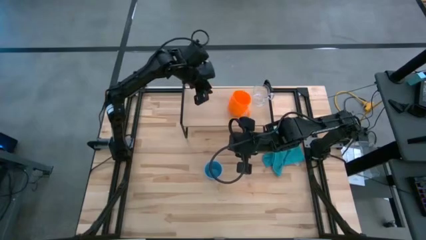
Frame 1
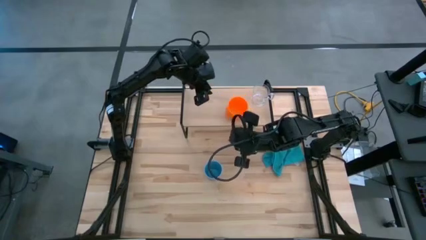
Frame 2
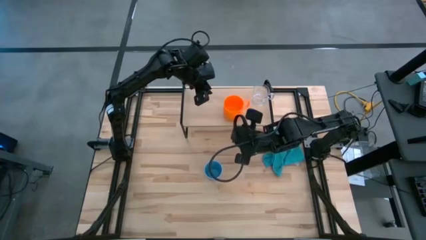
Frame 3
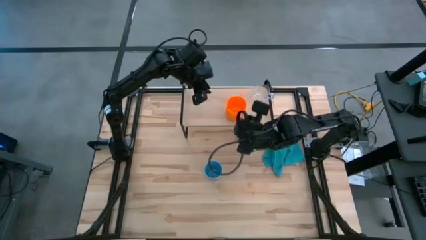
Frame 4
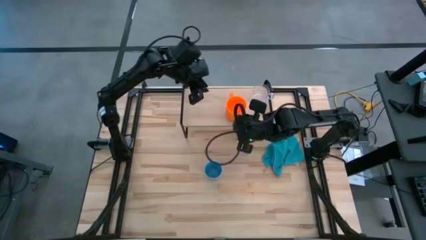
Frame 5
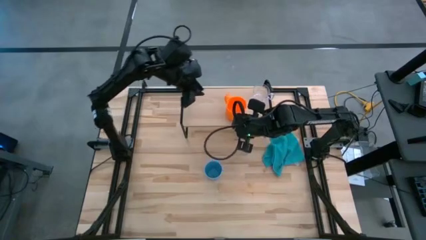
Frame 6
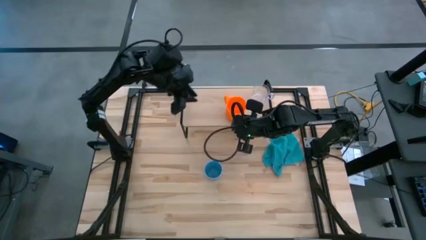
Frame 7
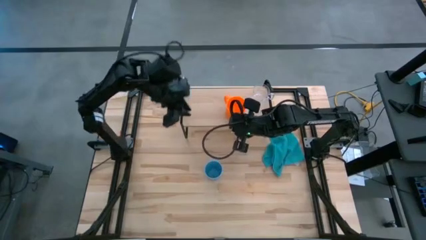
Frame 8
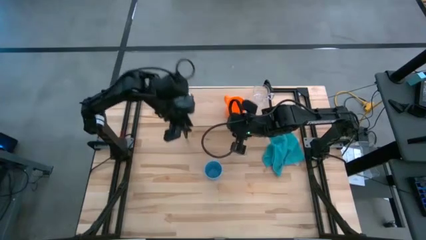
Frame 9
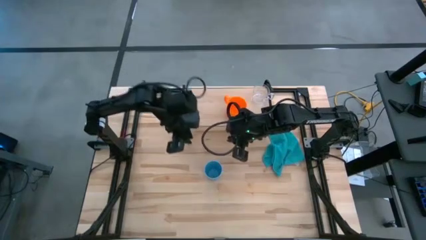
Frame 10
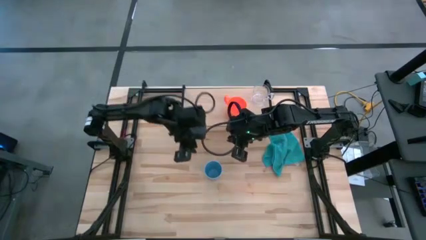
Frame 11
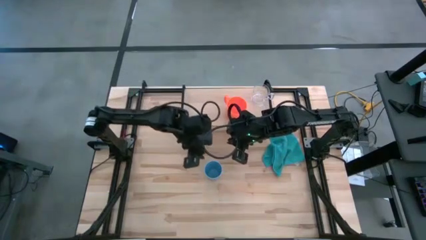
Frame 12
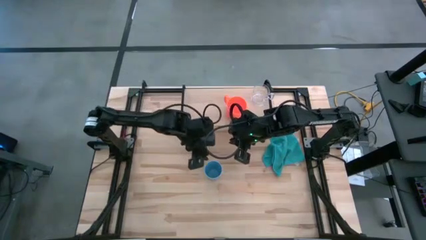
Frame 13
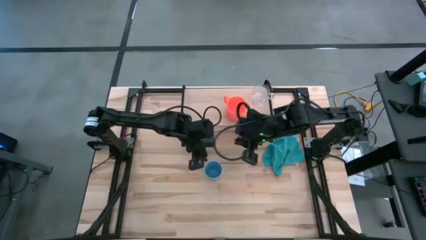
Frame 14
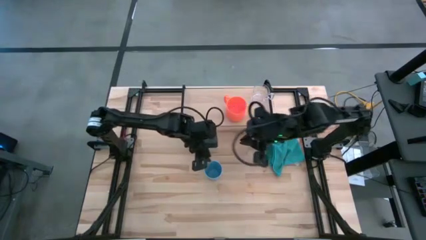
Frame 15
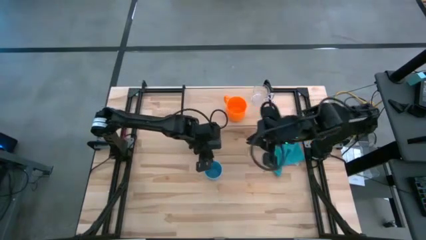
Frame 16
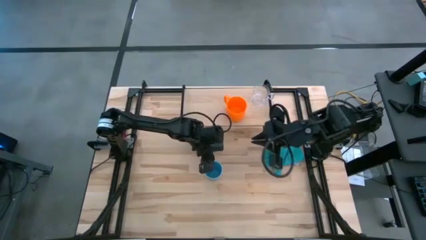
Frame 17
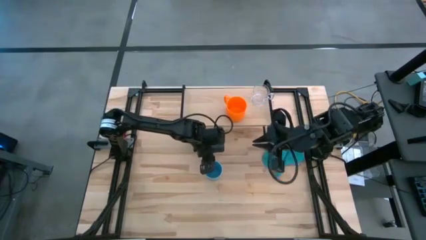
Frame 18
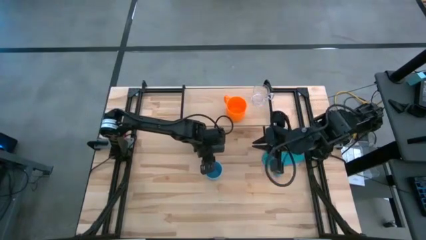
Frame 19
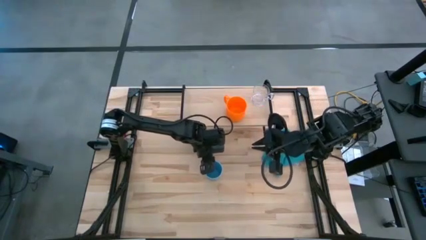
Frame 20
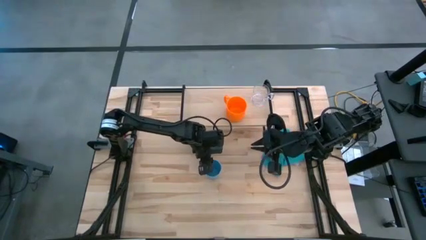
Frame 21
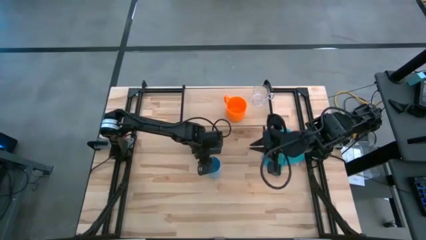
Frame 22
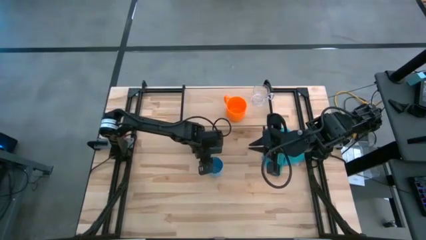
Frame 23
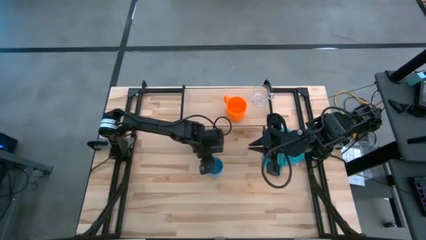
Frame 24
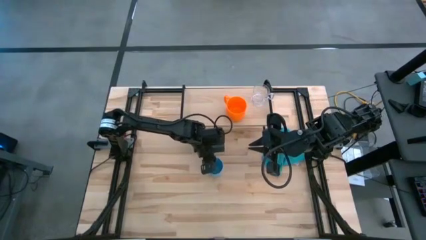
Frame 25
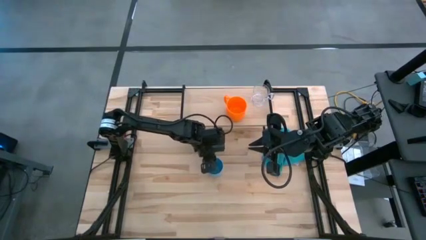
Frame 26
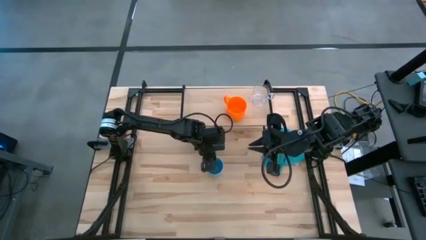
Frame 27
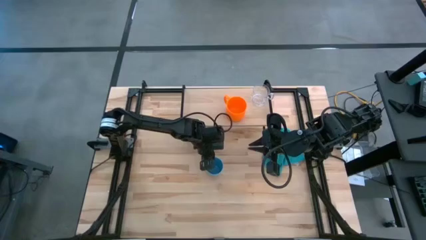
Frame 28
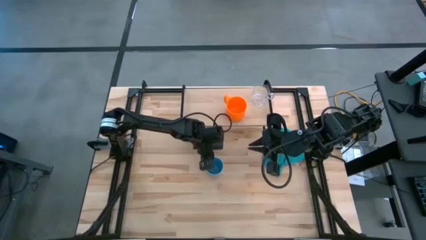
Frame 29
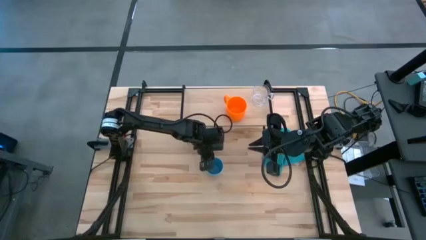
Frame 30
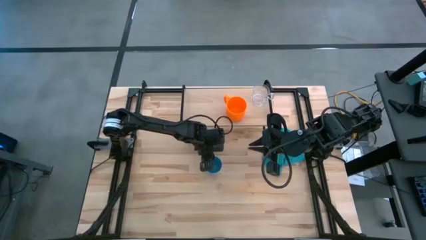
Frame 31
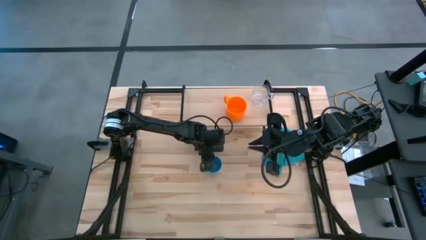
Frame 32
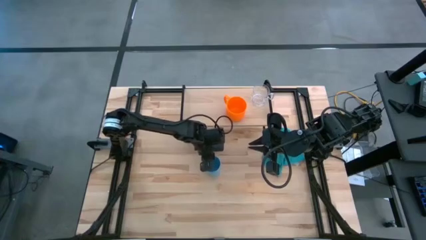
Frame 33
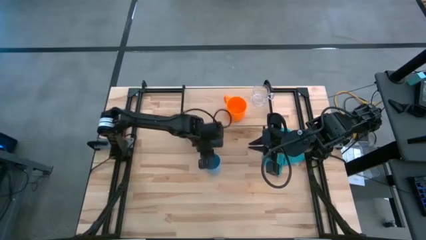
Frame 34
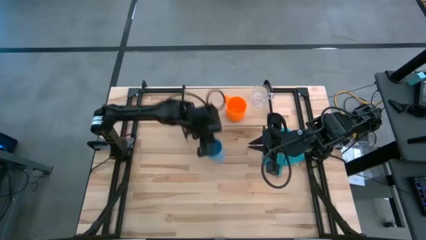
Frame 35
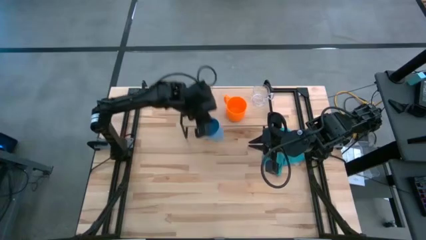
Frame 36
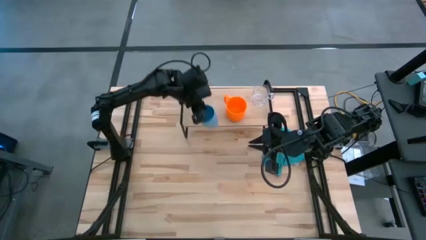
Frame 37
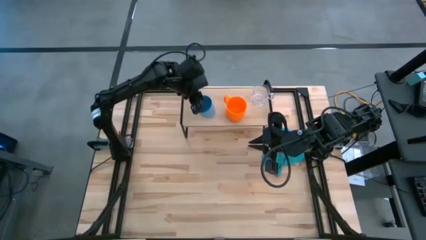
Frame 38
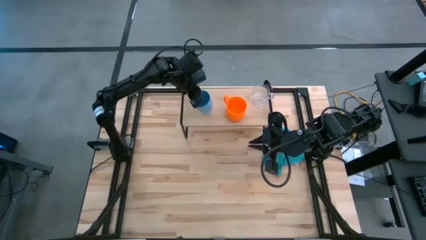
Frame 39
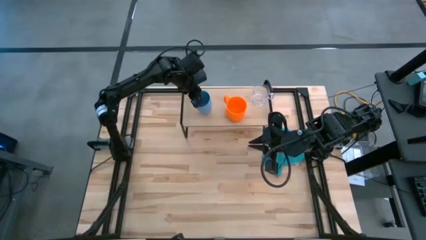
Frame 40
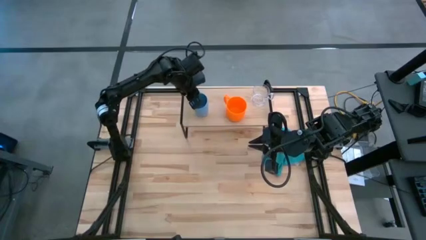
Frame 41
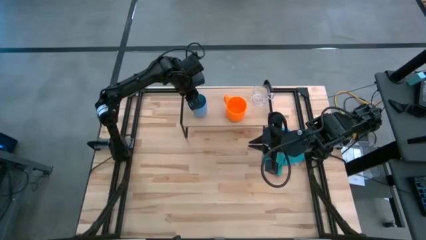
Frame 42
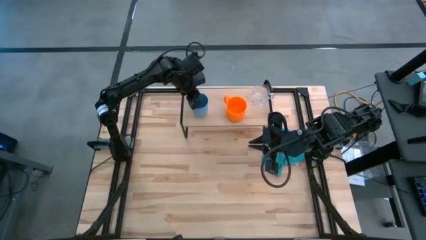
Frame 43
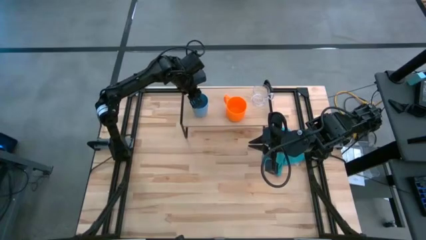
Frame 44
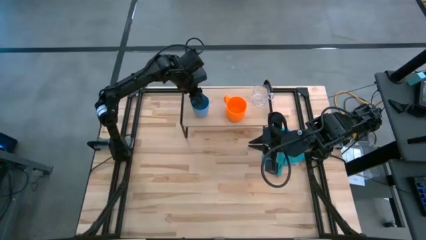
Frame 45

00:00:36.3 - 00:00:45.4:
Task: Stack small to large cups/mugs on shelf
Put the blue mug on the shelf

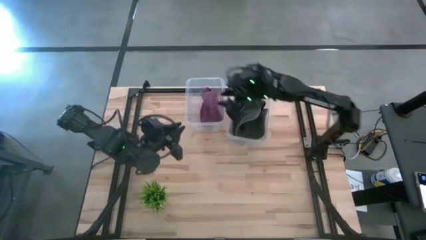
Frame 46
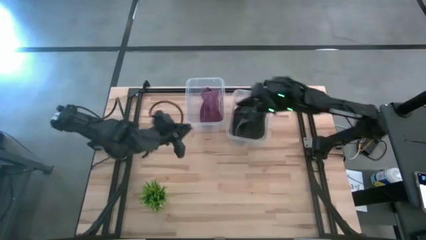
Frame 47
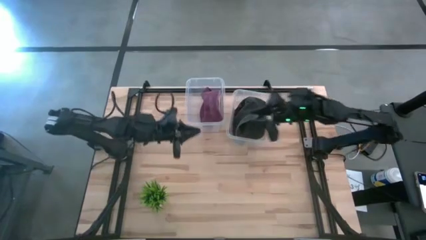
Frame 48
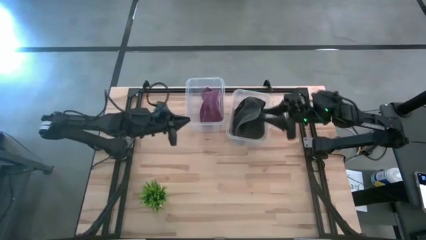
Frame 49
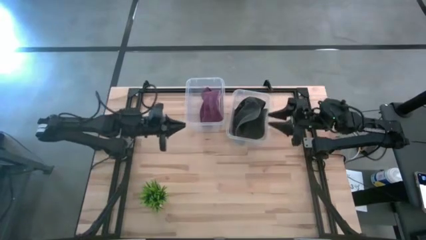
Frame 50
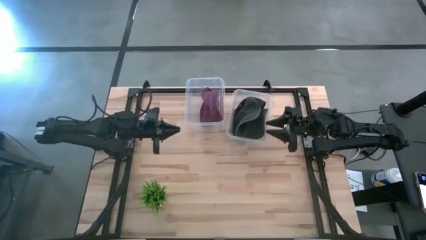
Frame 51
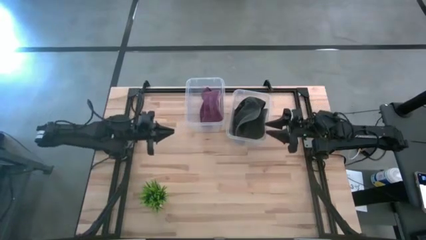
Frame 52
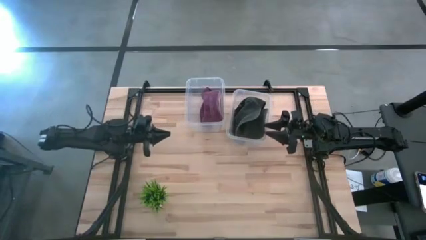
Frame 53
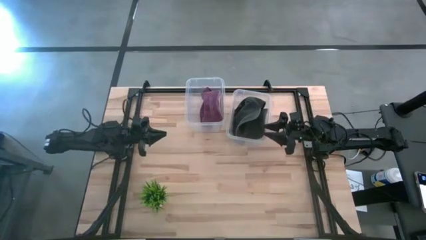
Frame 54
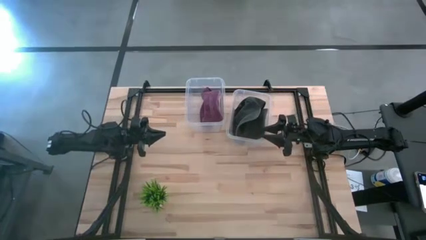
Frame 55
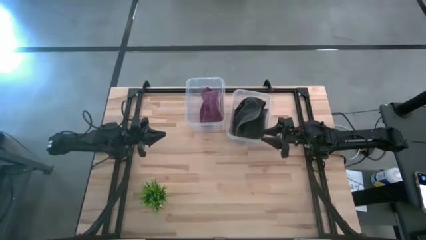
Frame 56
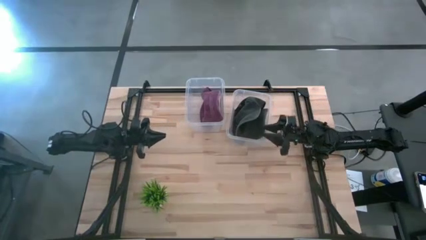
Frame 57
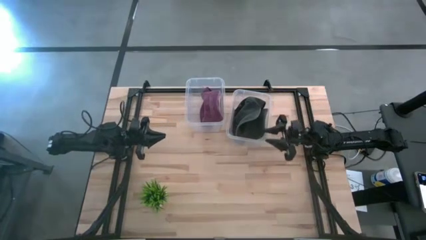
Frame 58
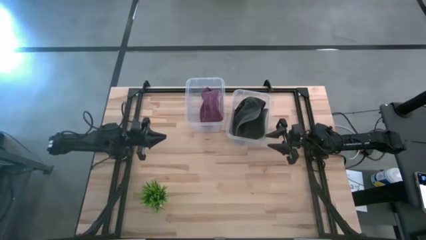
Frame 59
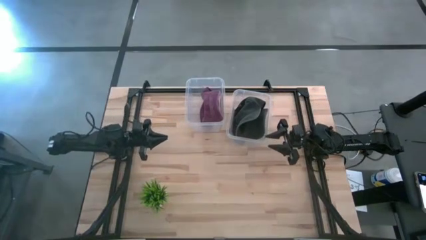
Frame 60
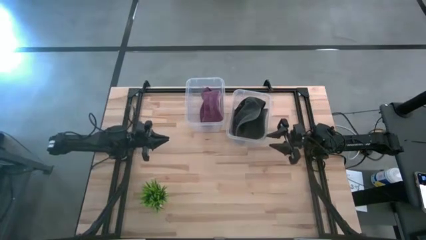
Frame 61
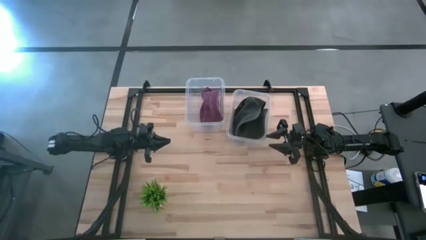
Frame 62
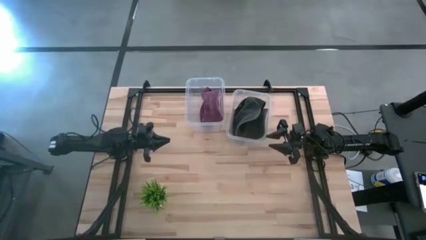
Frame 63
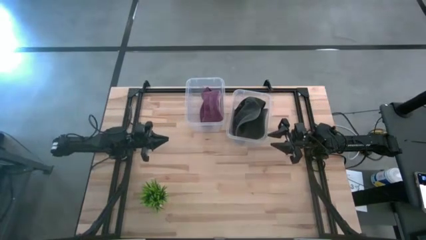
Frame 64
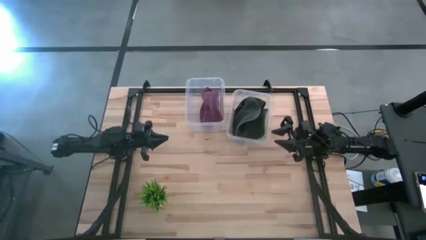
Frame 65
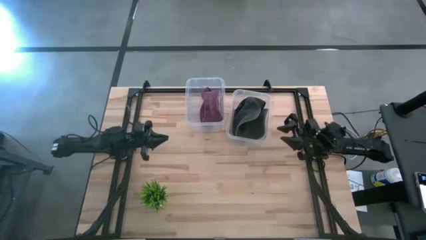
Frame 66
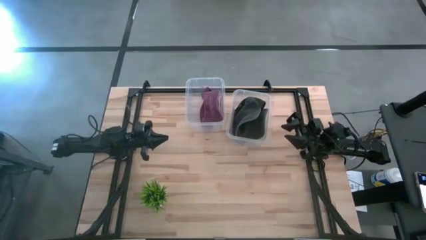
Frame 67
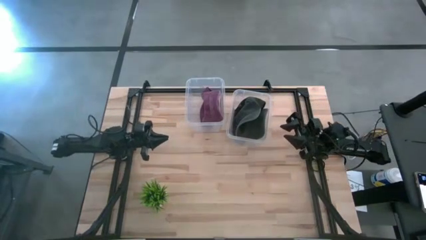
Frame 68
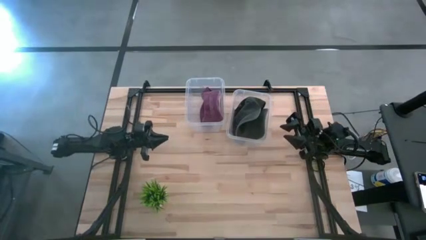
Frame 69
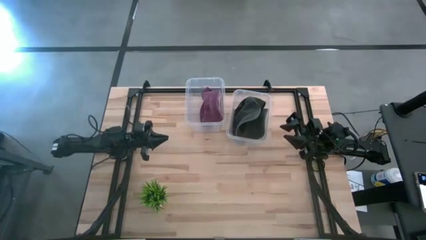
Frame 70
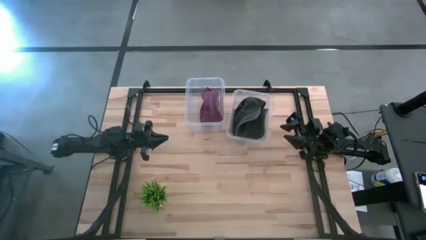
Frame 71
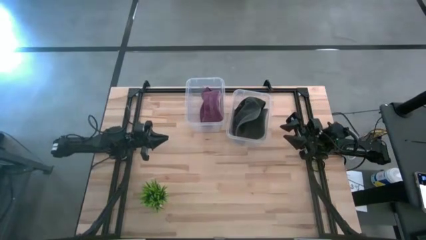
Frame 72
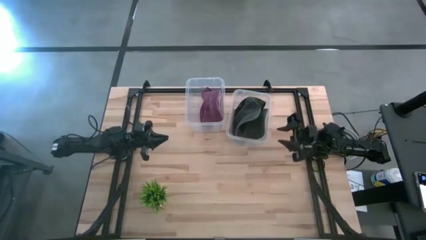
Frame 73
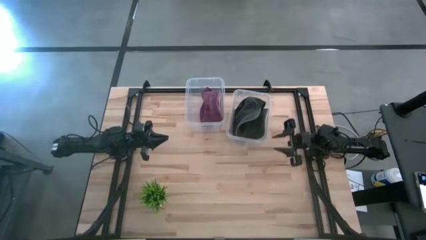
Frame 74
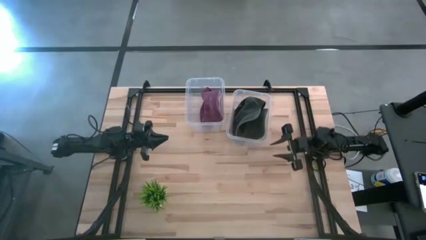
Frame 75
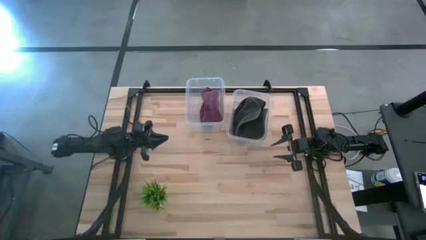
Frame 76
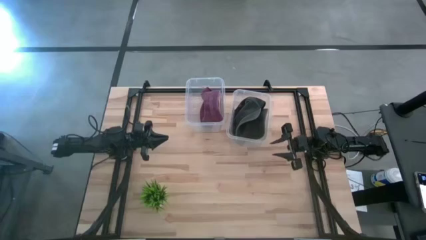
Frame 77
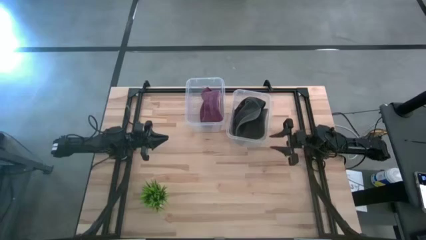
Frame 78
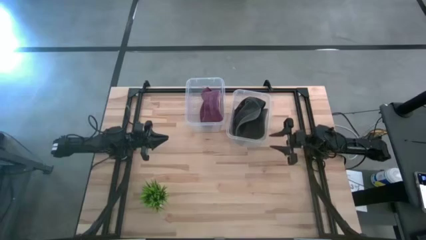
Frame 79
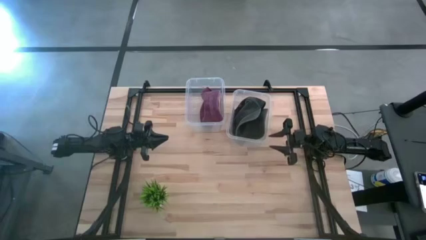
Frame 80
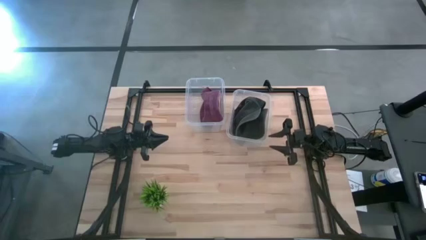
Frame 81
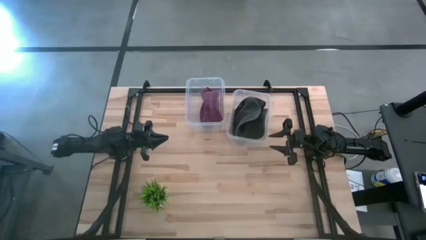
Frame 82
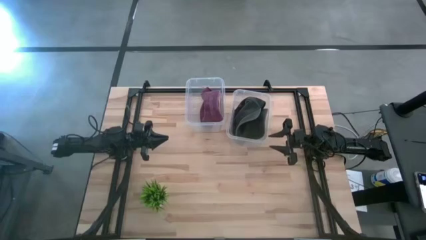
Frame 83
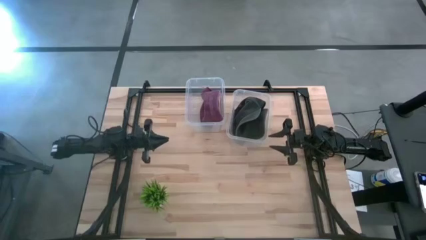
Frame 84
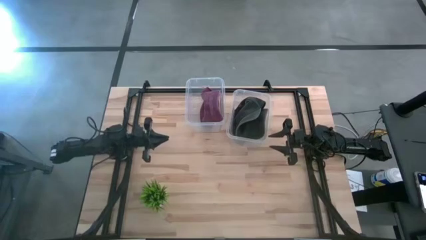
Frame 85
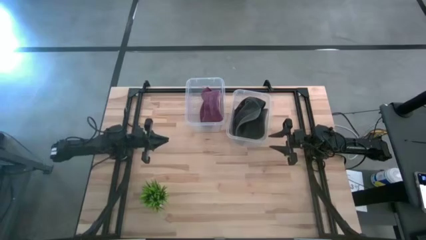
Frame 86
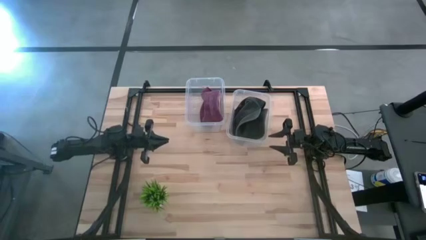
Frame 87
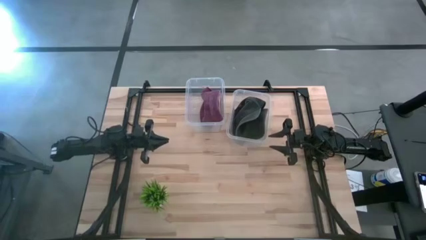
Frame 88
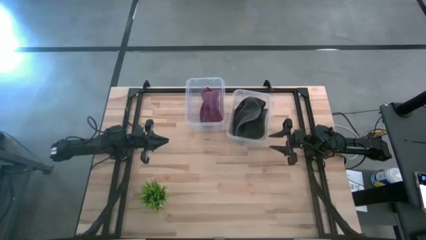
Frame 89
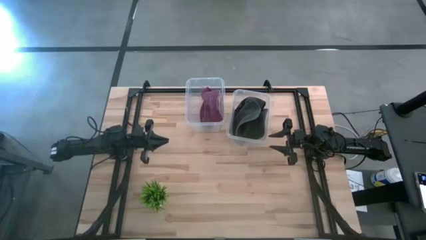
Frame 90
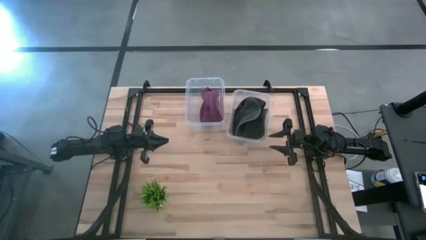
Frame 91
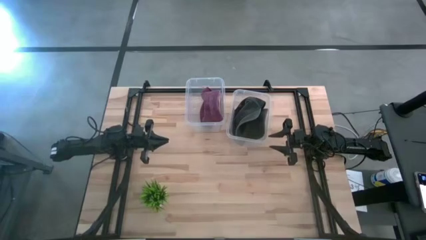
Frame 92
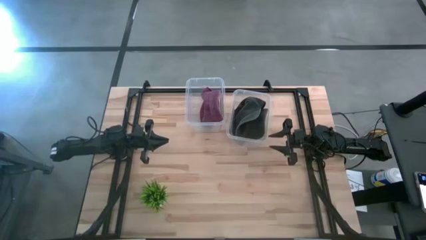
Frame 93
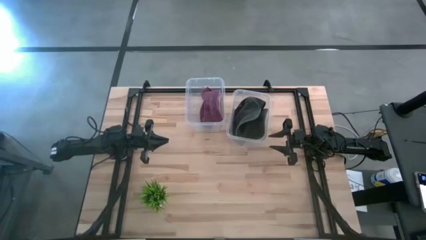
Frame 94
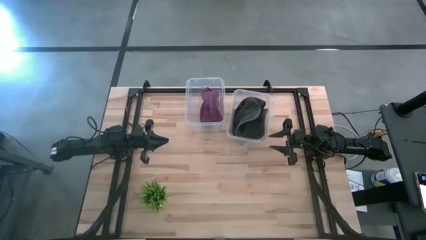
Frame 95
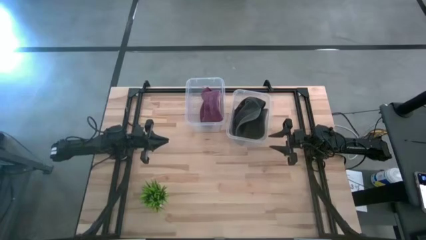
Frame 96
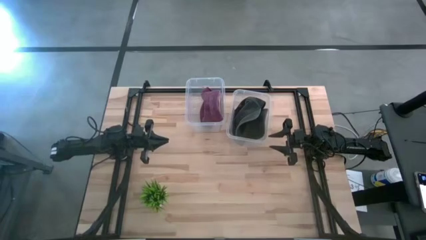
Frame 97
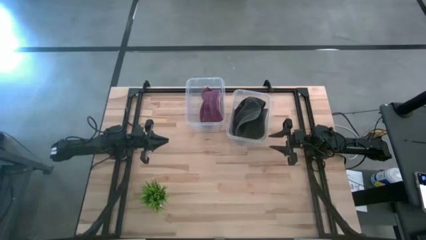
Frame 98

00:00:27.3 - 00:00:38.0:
Task: Pick & Place hat
Return to Home Position
